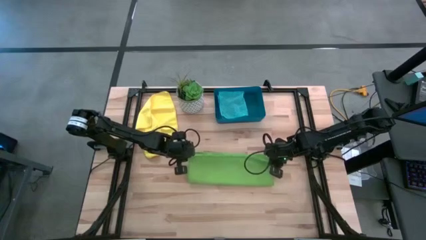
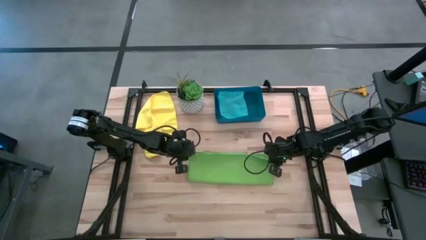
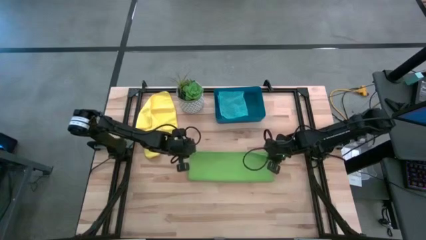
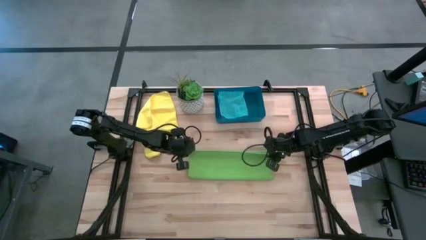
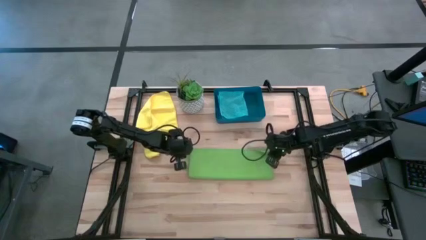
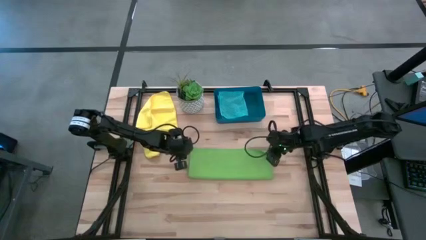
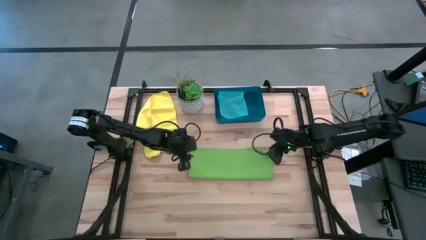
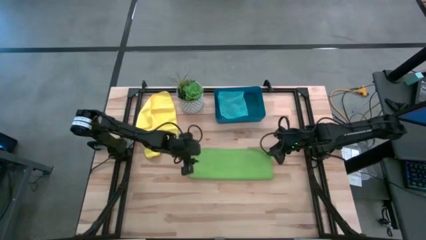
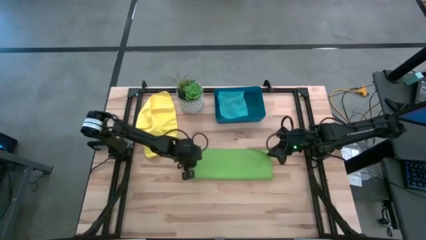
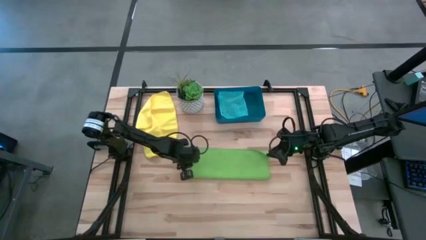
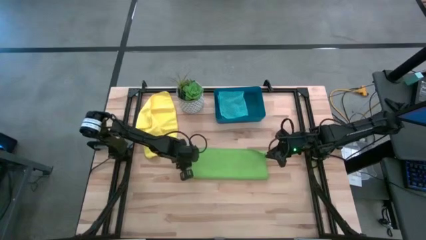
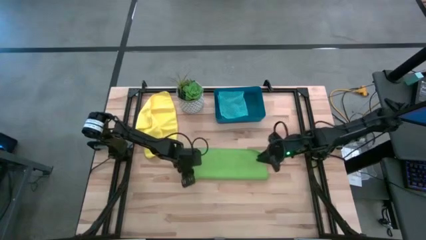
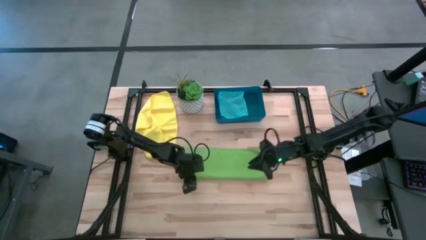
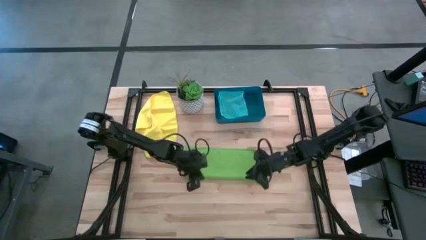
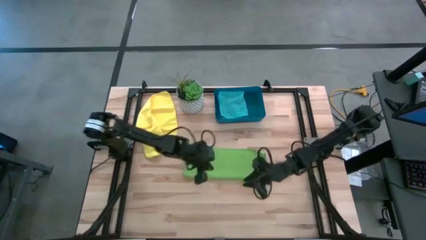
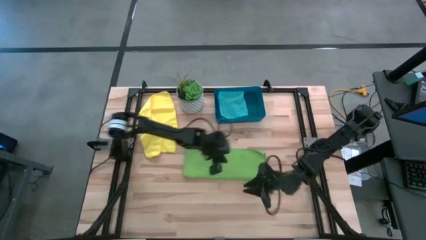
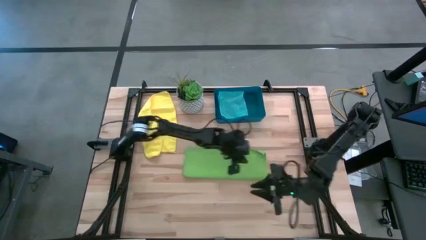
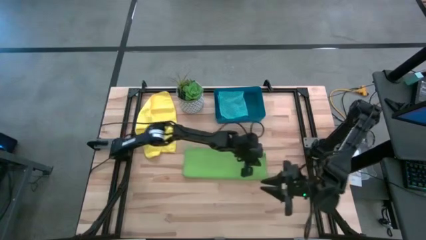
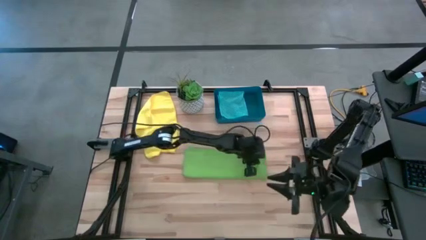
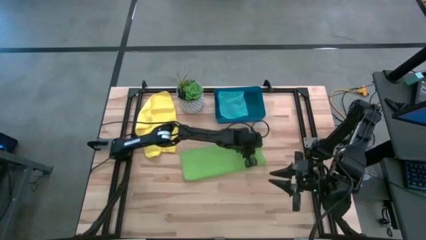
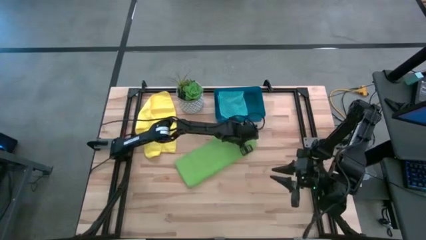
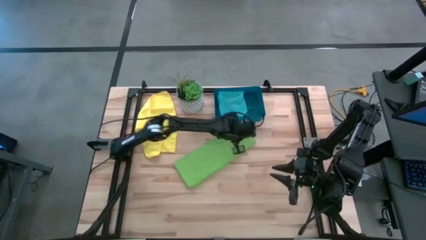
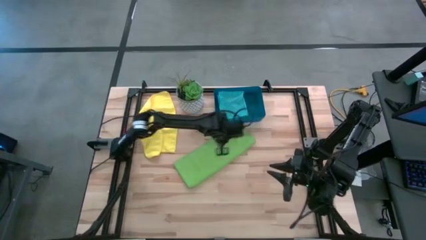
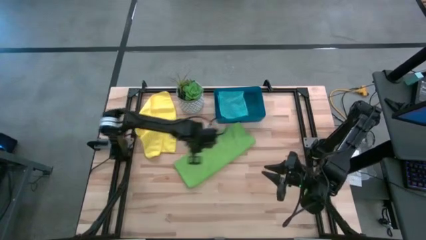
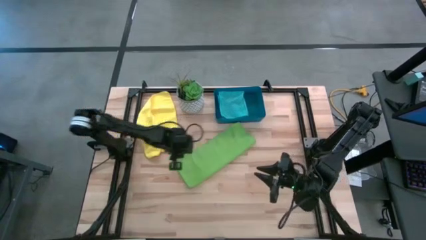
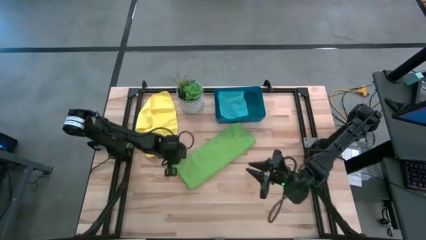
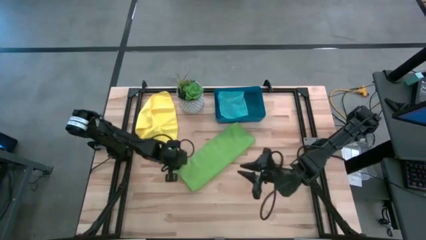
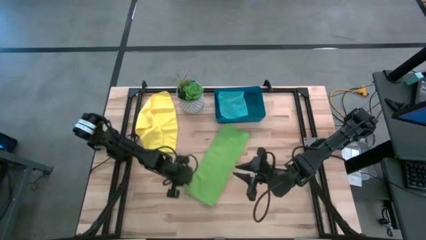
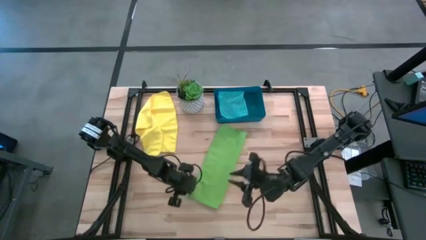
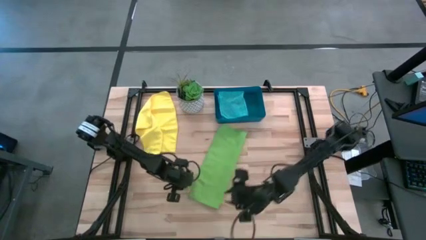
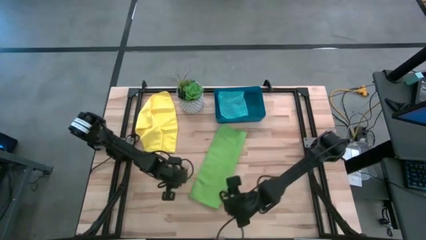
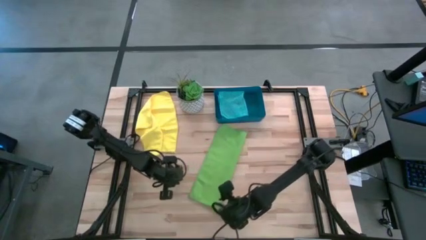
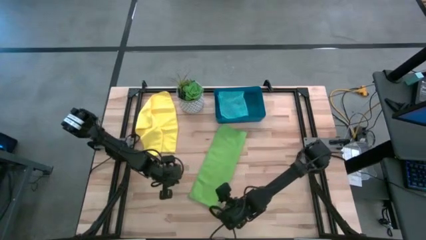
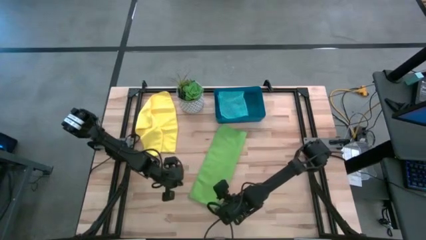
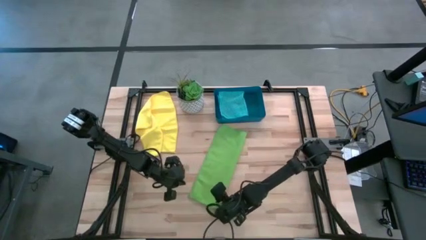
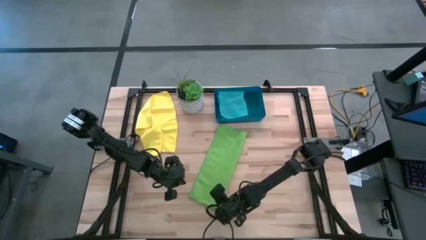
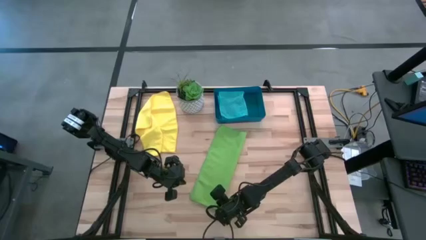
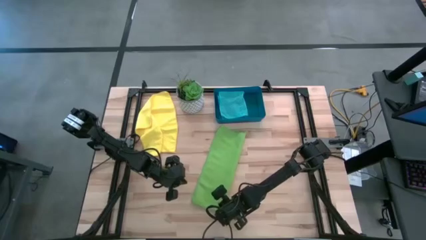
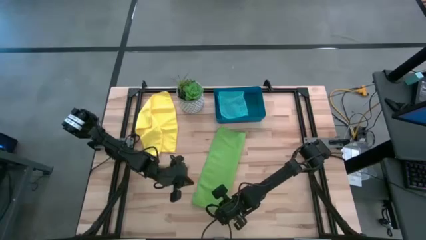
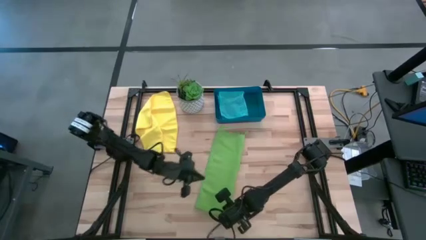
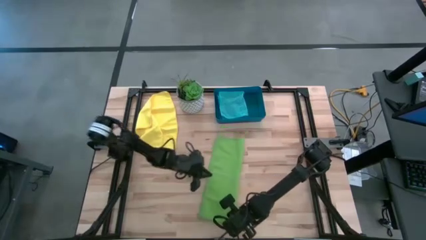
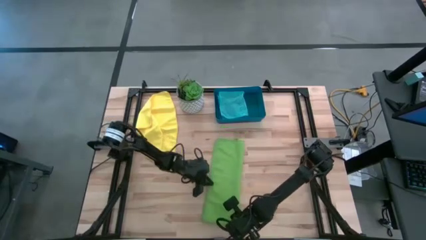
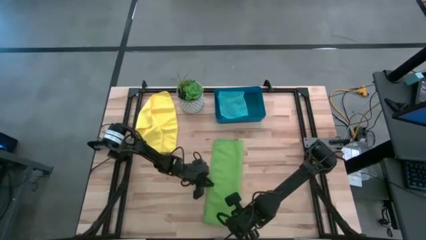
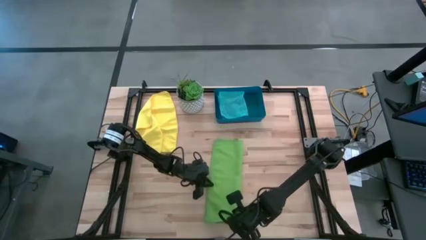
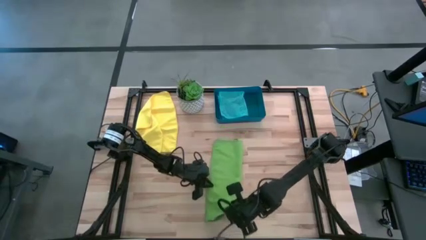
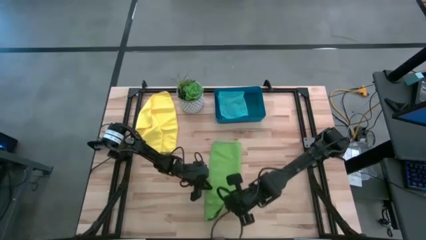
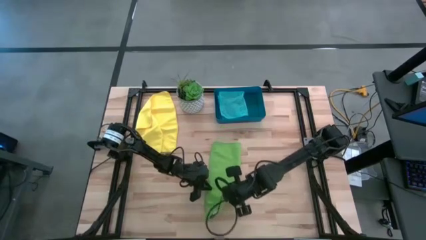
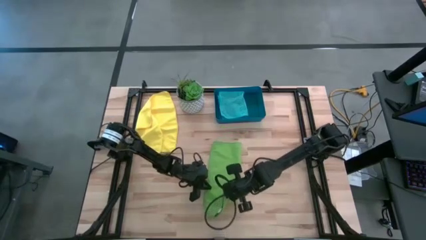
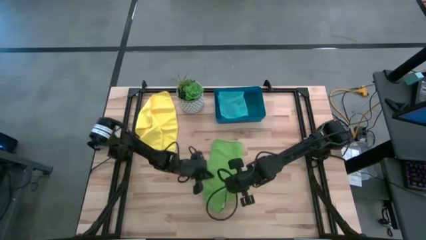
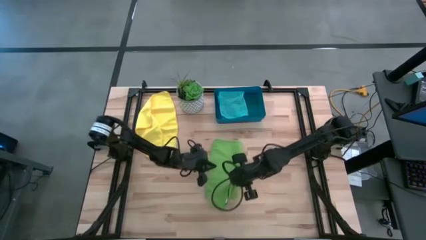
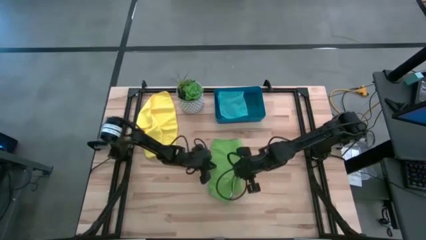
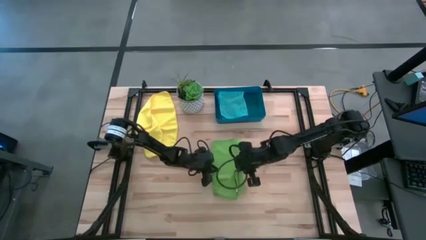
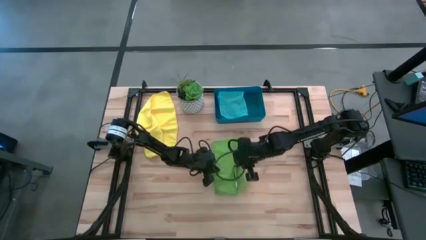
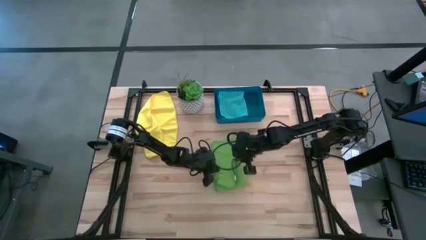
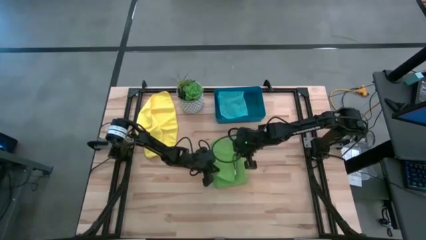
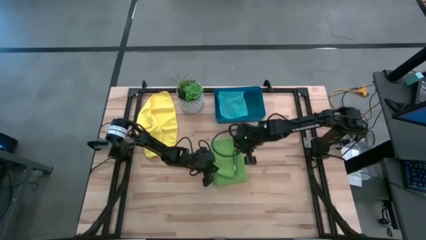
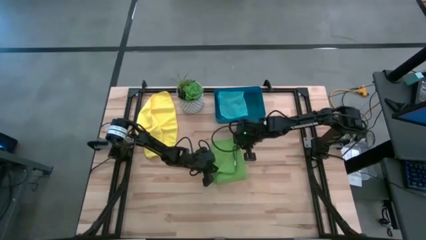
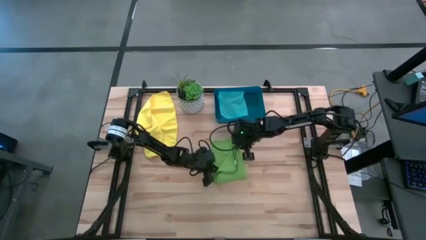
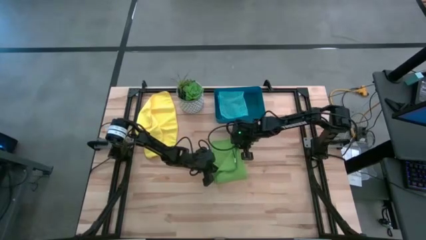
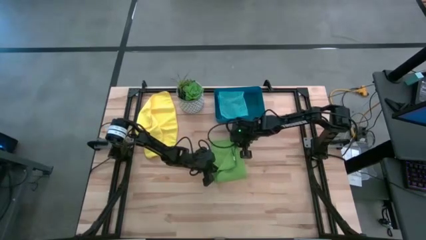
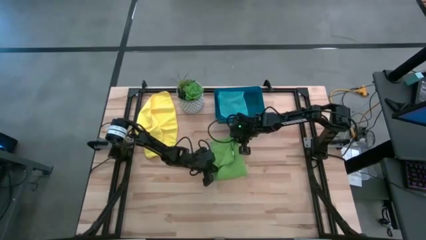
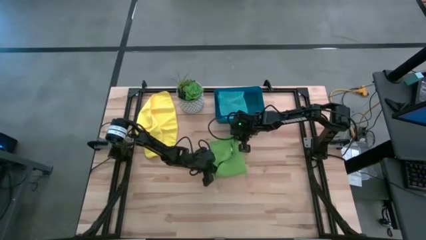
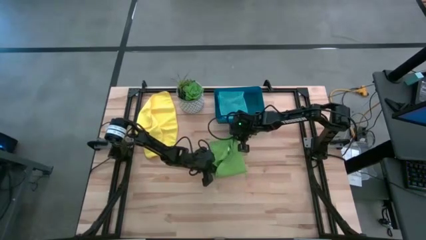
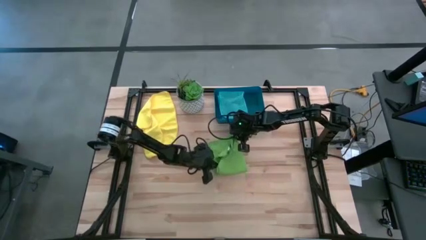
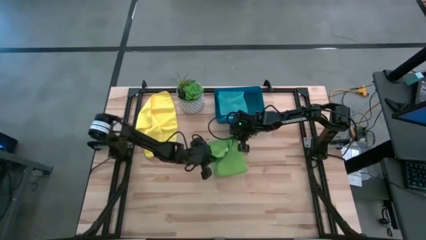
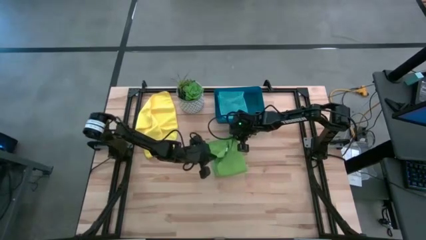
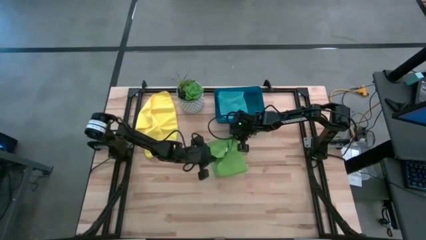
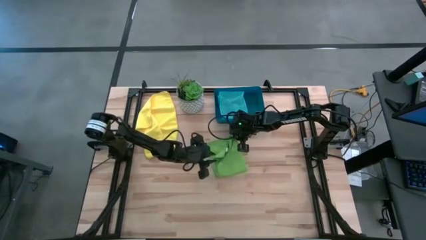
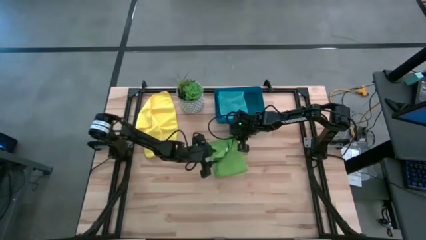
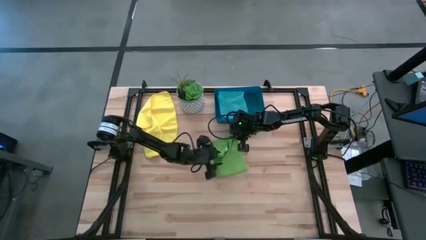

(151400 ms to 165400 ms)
Task: Fold microfiber towels
Fold the green microfiber towel on top of the light blue microfiber towel into the dark blue bin
